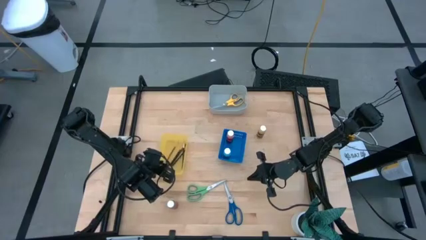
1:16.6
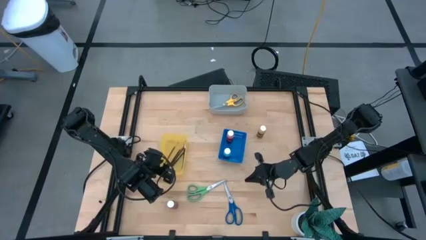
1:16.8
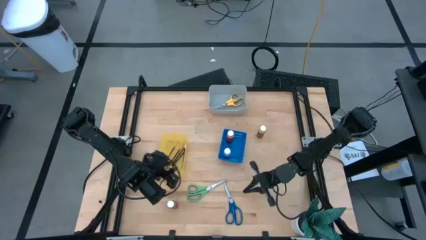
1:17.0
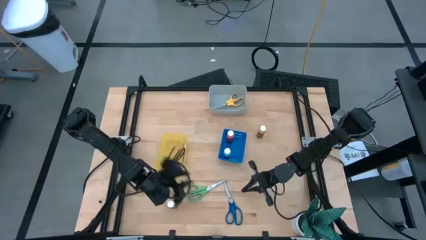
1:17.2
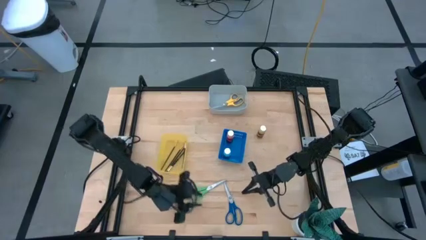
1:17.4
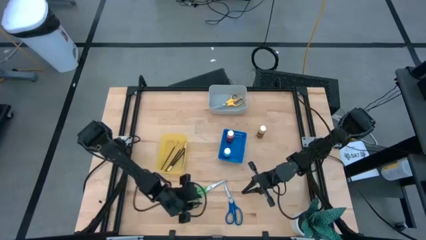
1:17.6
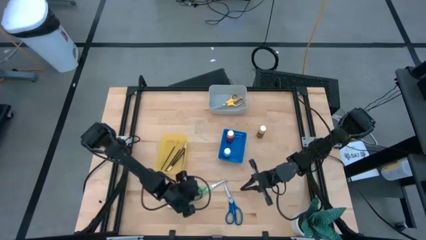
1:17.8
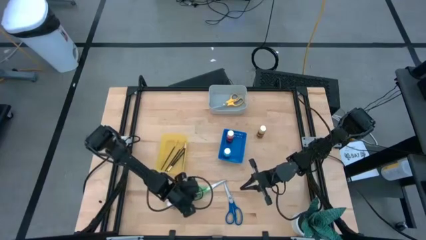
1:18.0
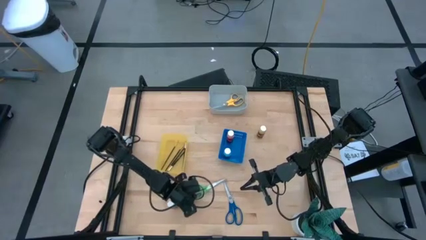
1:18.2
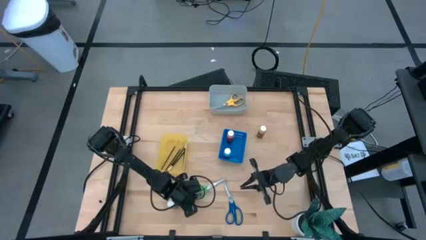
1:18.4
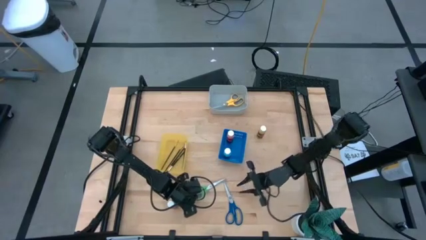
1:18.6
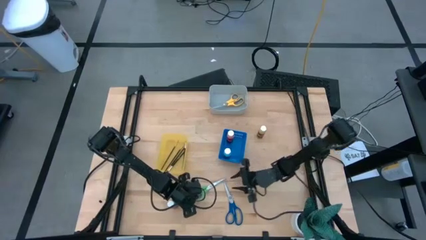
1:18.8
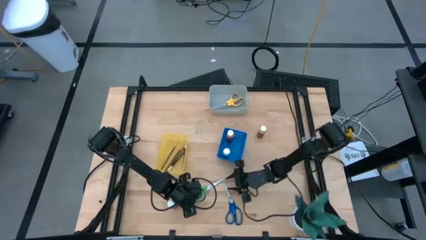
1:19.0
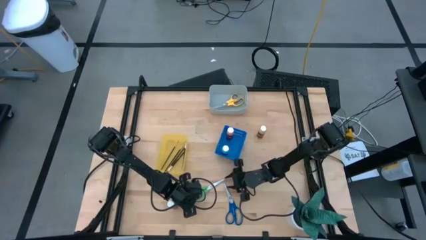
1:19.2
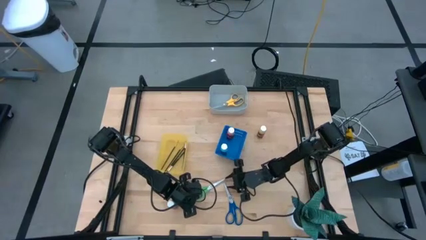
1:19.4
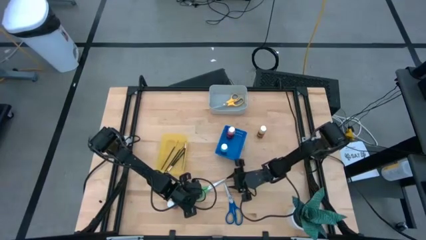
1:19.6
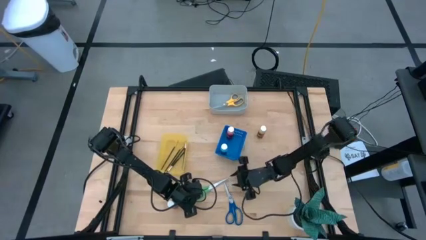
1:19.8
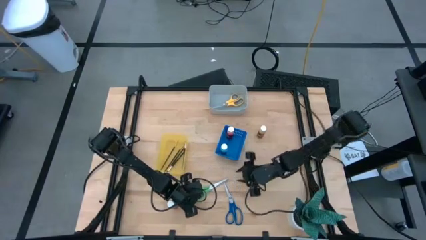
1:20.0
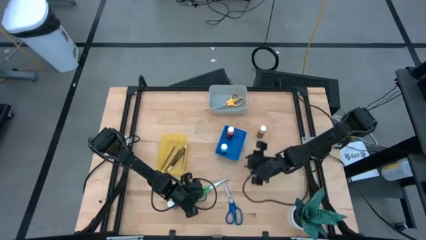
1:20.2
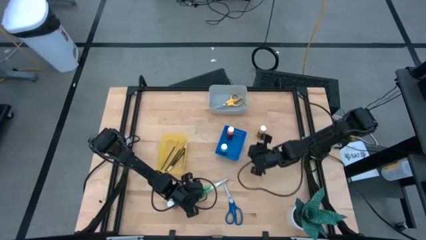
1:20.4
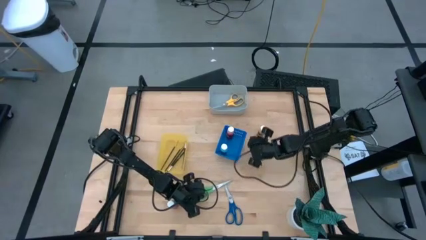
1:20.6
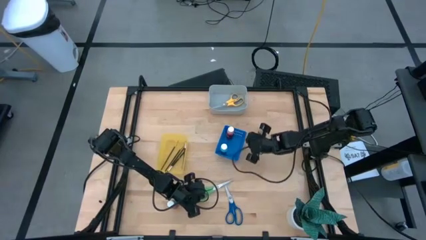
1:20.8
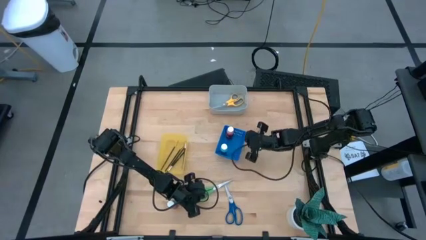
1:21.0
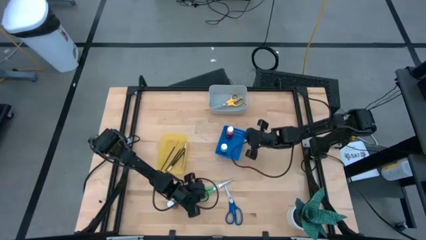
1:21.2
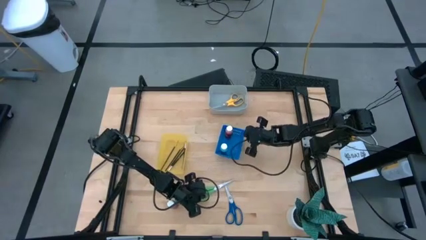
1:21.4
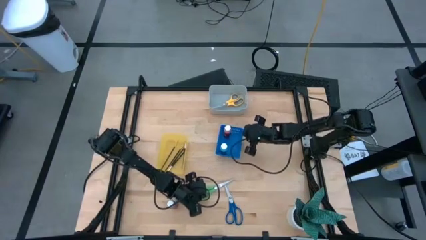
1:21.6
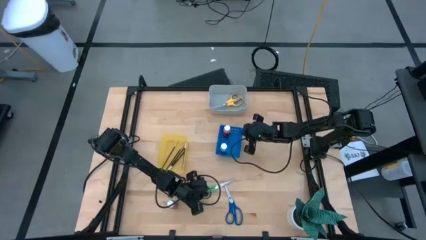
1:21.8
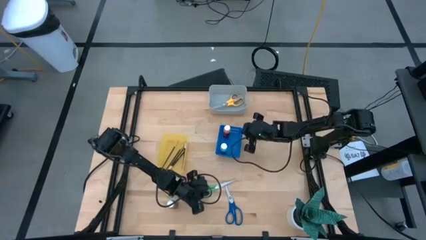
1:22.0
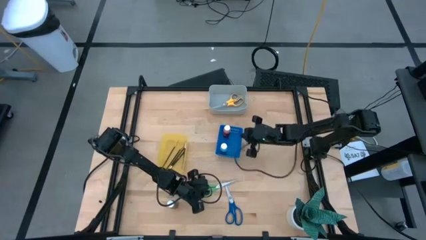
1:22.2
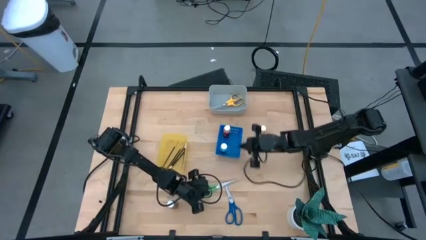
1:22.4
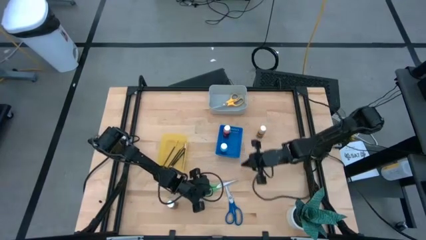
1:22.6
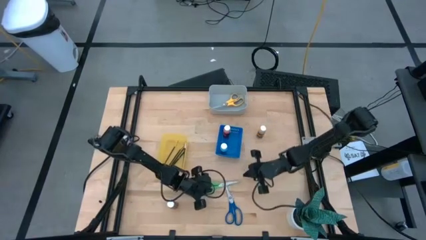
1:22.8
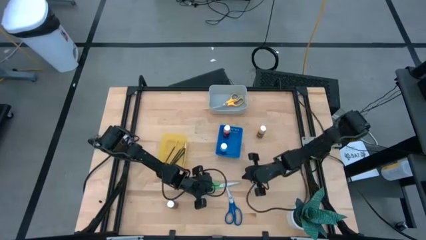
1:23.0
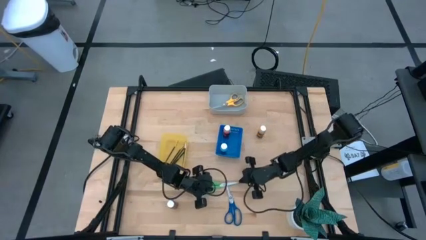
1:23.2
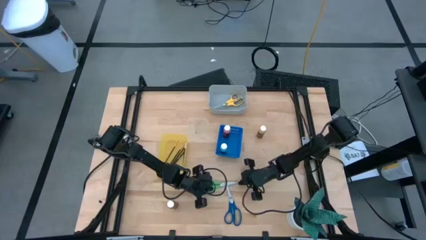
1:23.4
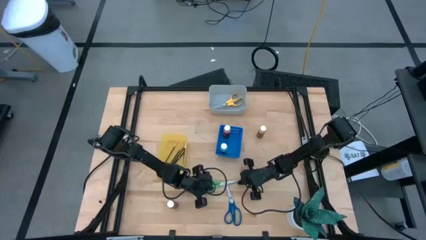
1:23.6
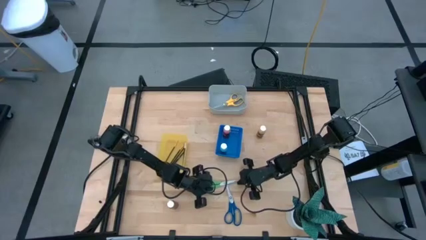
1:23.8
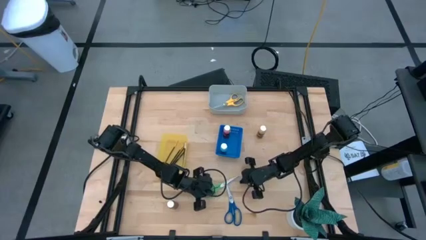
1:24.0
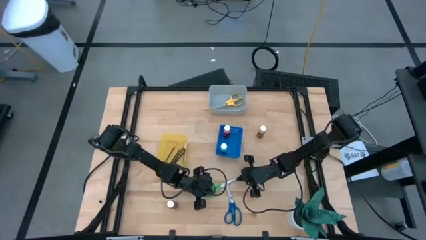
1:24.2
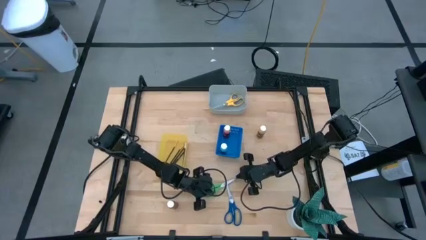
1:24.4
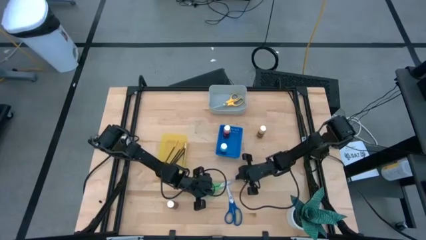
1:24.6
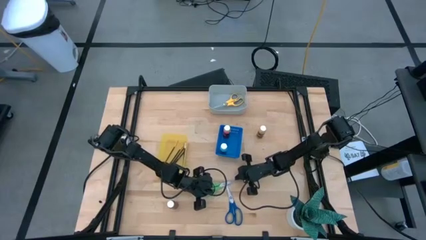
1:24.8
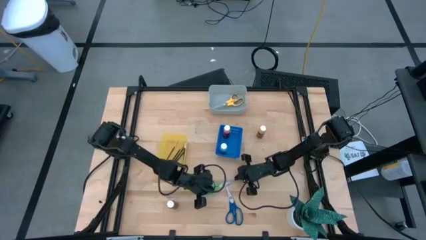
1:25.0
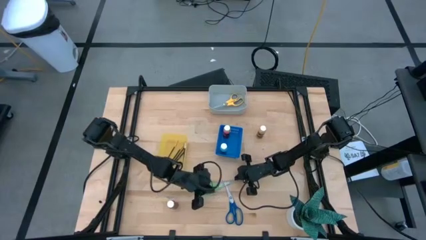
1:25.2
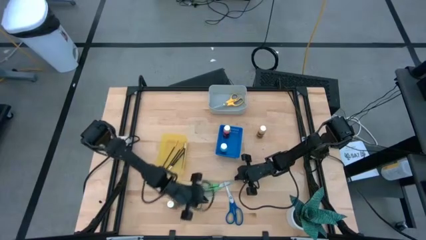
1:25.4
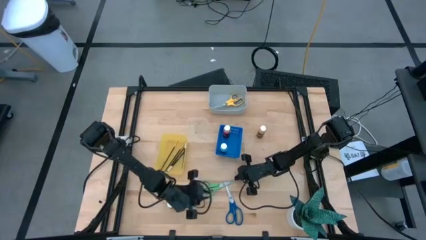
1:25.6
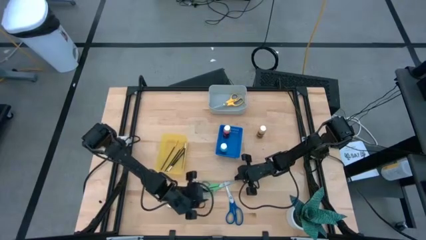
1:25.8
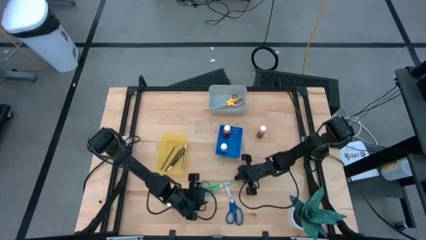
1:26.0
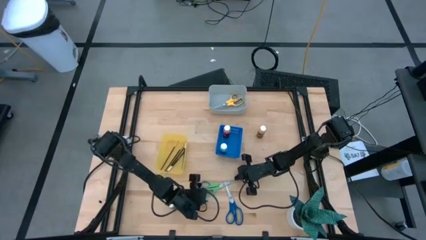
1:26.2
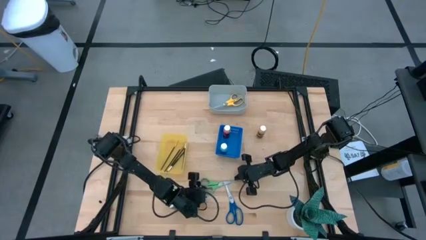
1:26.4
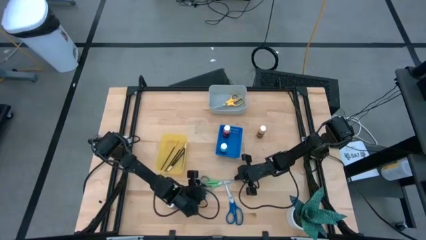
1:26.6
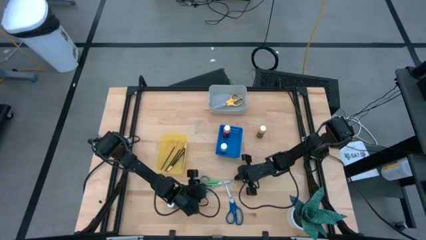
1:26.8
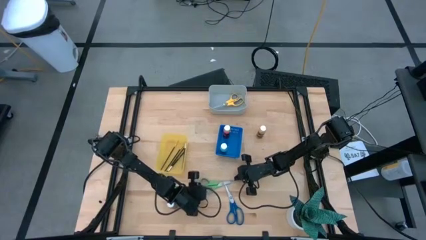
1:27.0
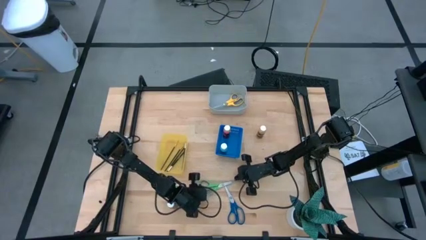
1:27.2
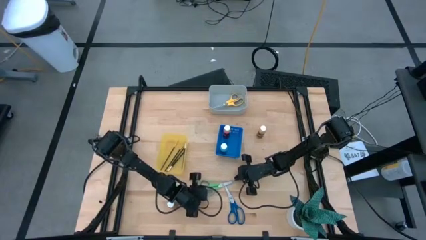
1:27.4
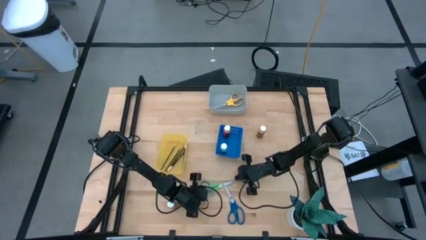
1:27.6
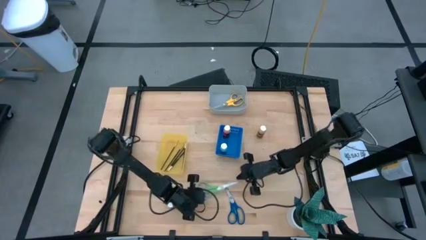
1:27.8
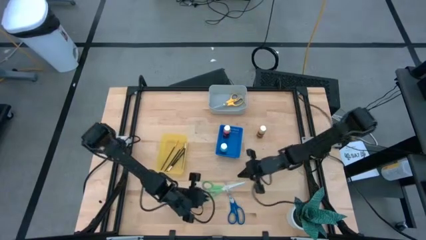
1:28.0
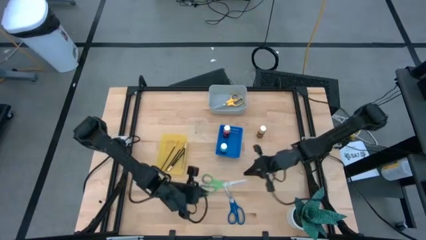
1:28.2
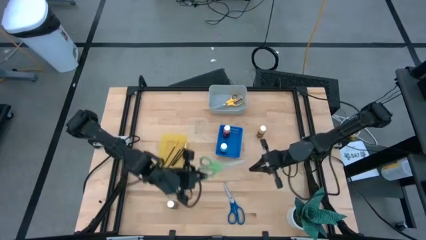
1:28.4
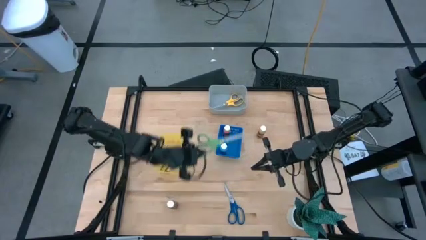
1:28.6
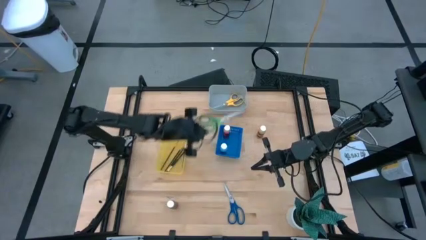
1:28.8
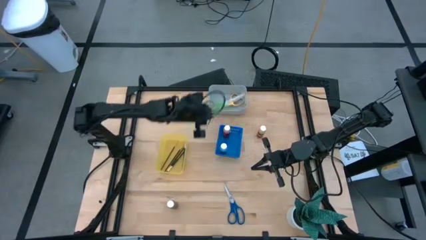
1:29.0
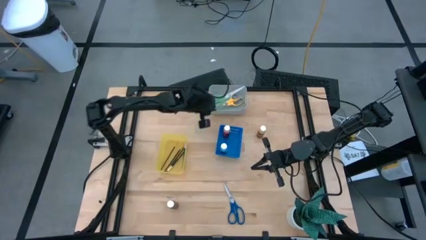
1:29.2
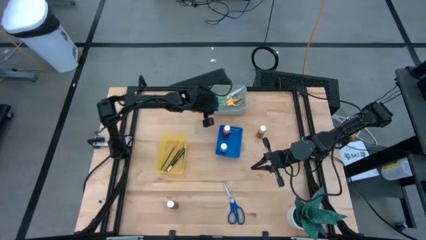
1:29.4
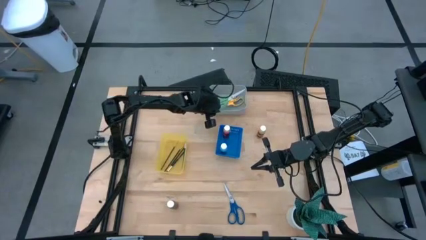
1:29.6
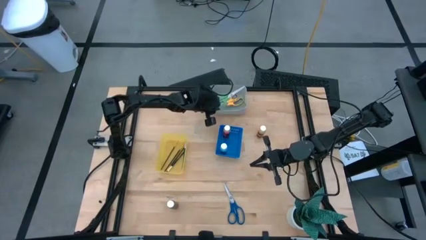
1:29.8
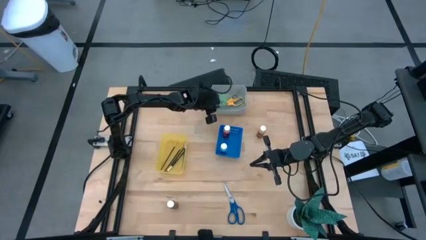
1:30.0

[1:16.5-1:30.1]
Task: Pick & Place Paint Supplies
Put the green scissors into the gray bin

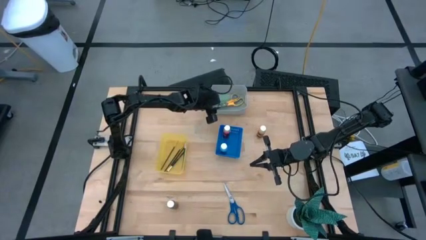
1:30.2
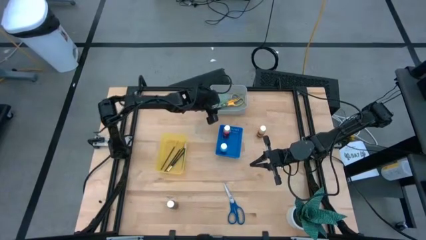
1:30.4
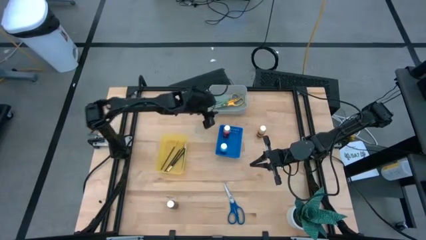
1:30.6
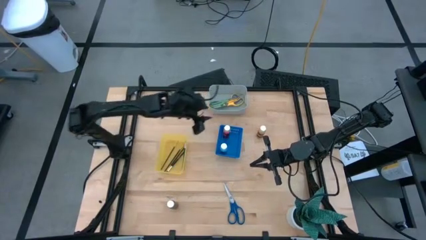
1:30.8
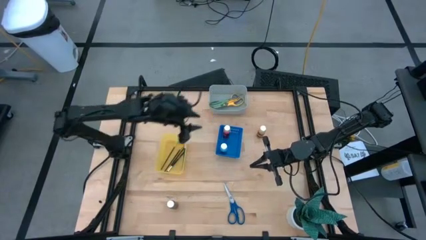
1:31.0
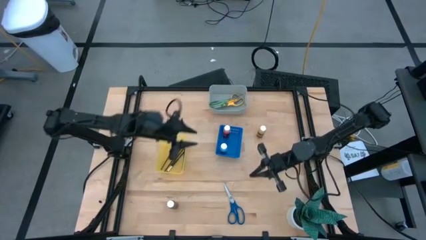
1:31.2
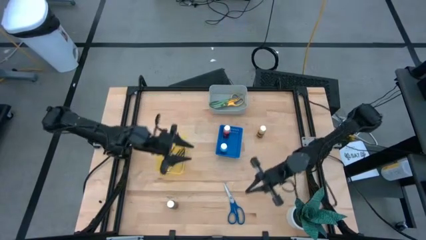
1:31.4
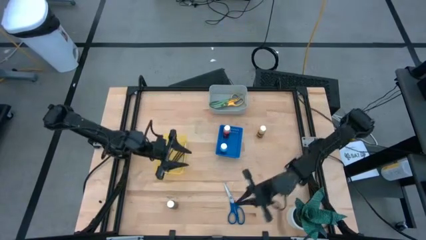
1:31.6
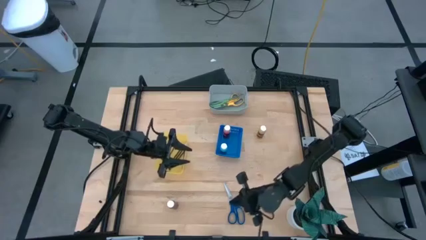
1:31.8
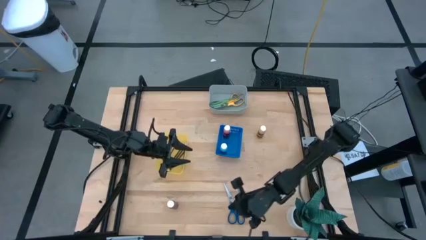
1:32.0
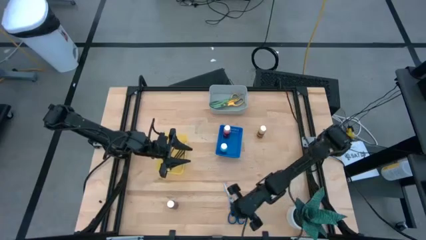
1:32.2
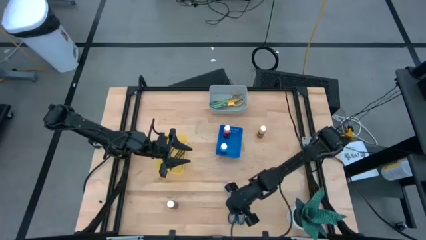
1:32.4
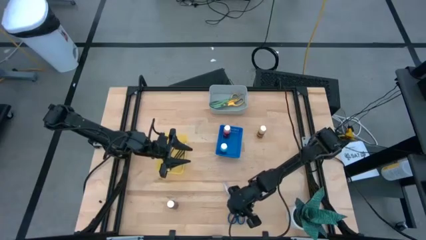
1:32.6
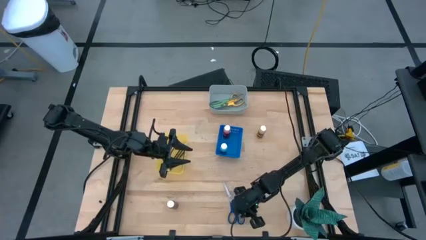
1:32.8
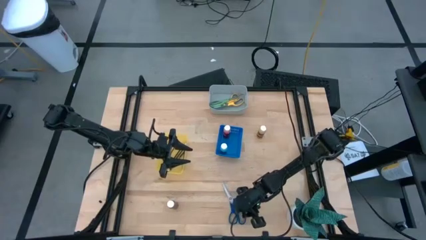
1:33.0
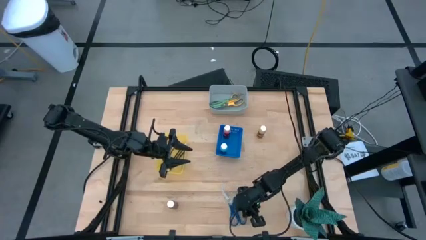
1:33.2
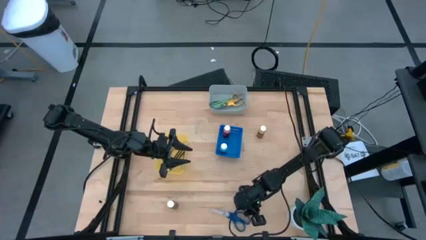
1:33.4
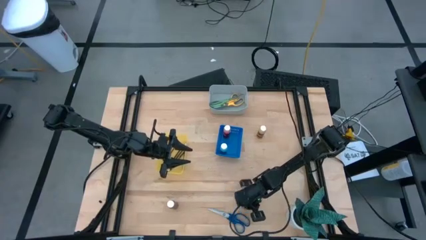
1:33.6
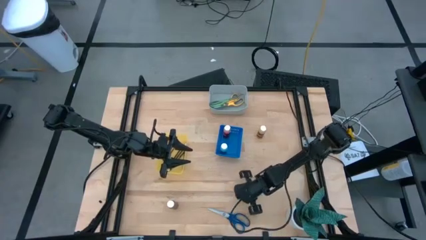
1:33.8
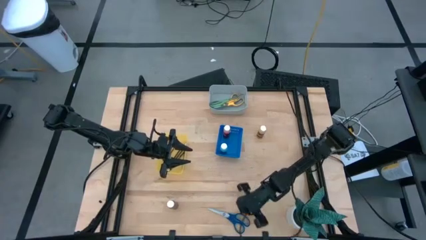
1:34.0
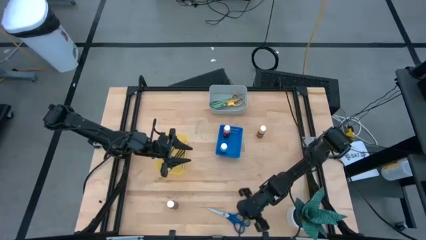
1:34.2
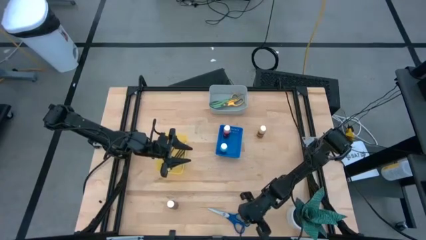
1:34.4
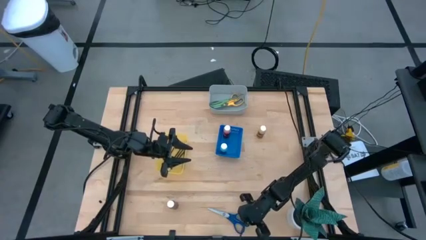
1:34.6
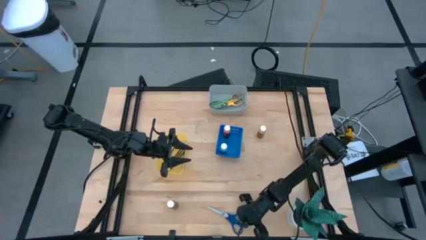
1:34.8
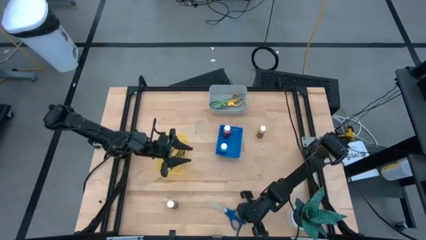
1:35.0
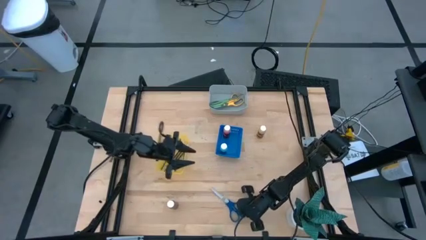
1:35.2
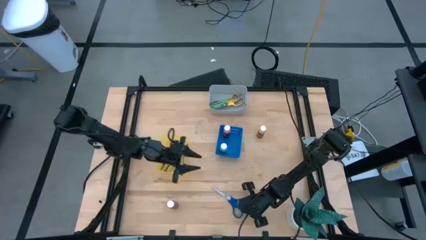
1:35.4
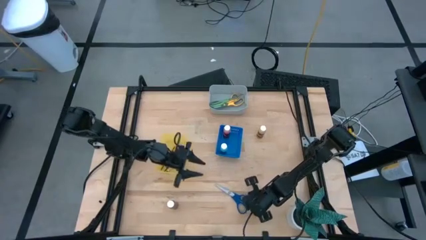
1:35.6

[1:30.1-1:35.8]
Adjust the blue scissors
